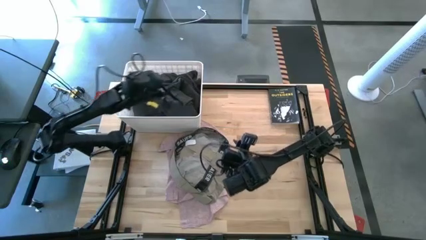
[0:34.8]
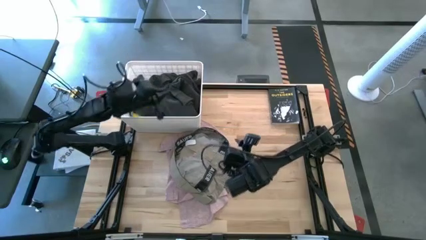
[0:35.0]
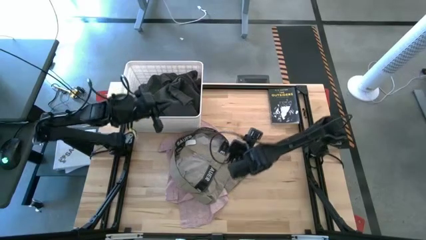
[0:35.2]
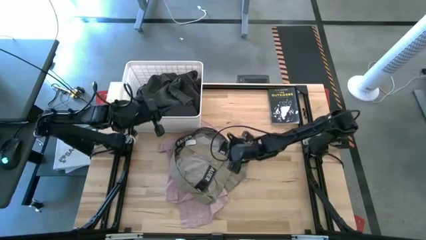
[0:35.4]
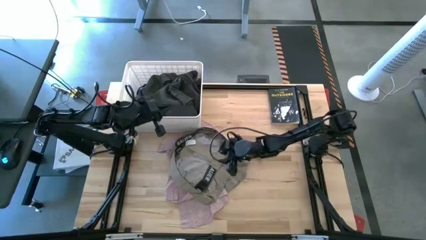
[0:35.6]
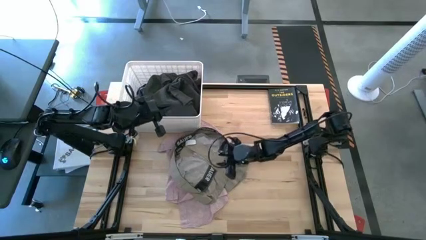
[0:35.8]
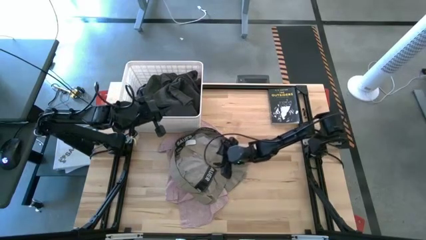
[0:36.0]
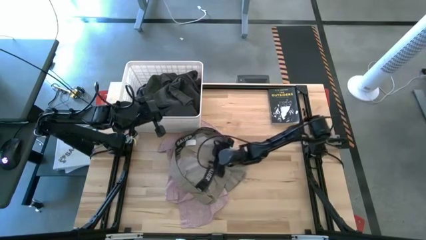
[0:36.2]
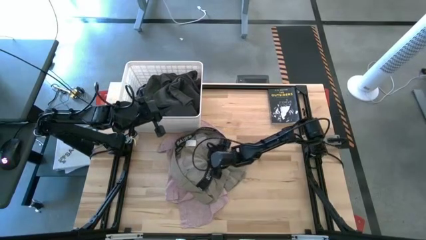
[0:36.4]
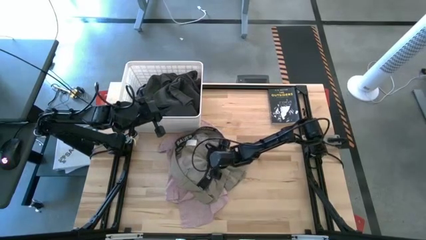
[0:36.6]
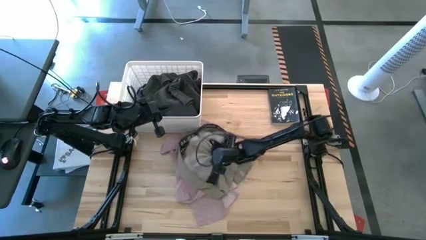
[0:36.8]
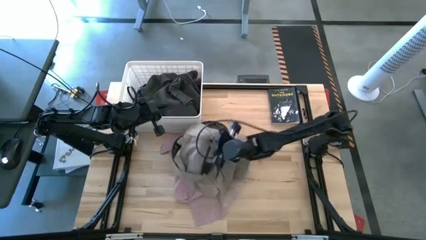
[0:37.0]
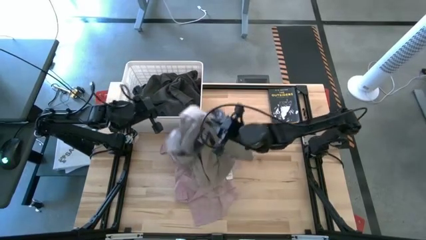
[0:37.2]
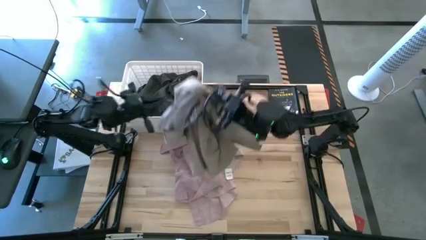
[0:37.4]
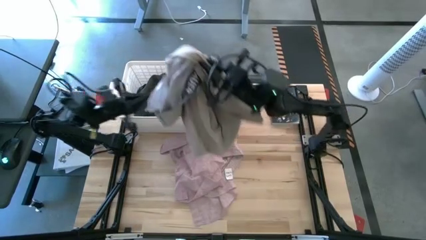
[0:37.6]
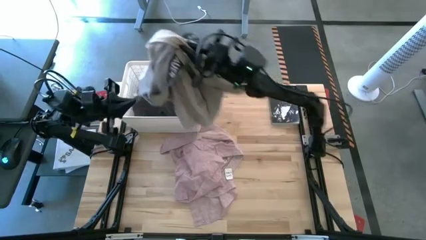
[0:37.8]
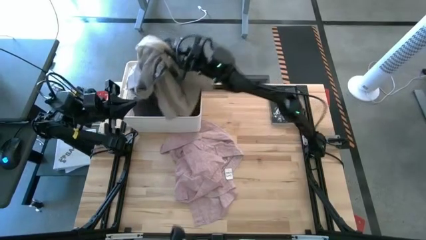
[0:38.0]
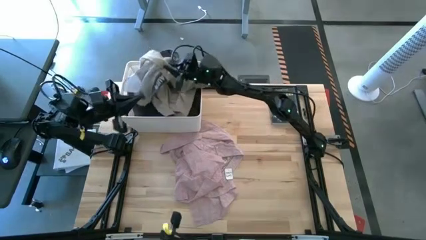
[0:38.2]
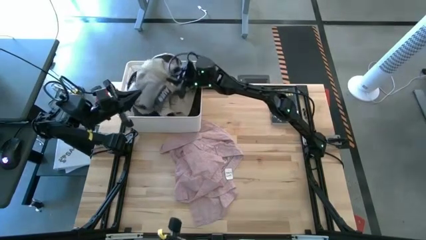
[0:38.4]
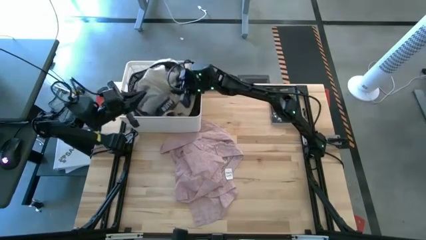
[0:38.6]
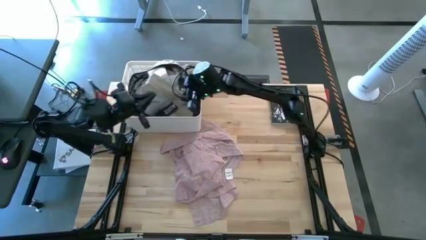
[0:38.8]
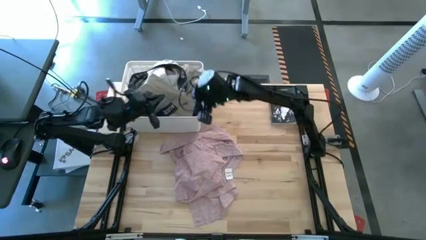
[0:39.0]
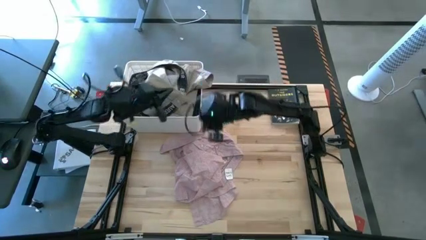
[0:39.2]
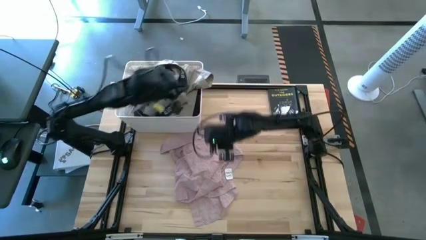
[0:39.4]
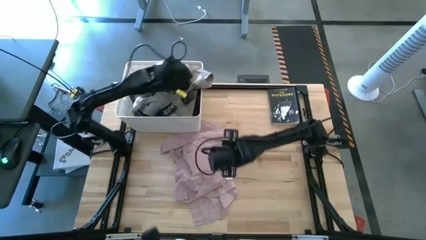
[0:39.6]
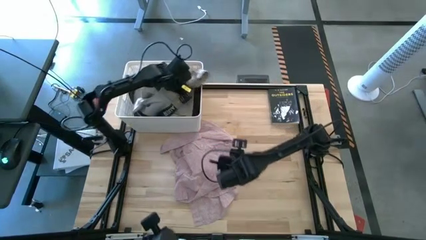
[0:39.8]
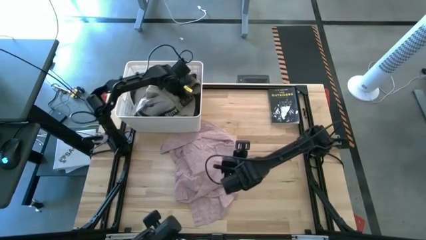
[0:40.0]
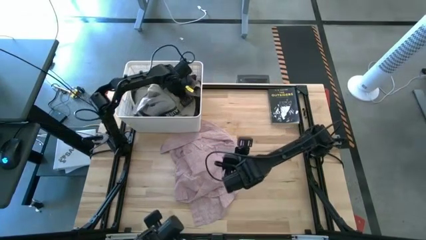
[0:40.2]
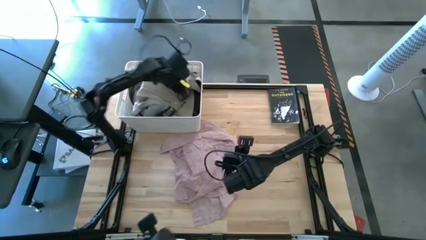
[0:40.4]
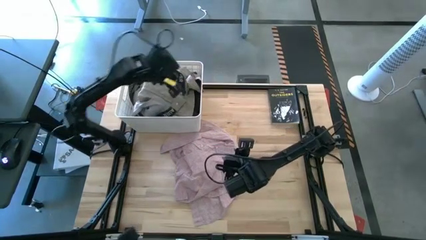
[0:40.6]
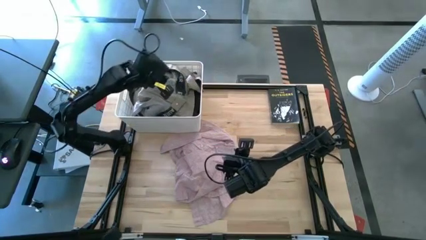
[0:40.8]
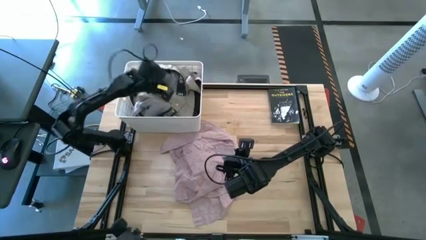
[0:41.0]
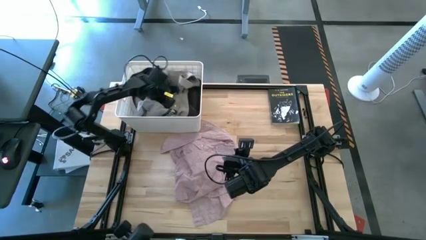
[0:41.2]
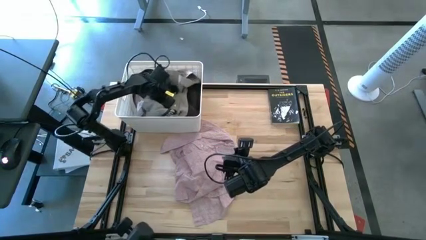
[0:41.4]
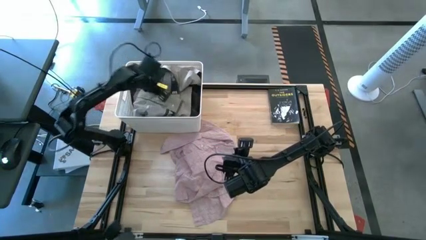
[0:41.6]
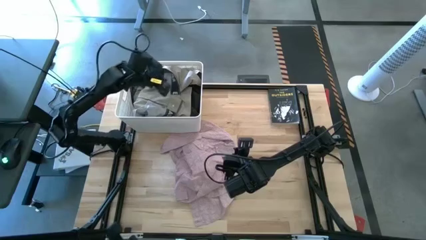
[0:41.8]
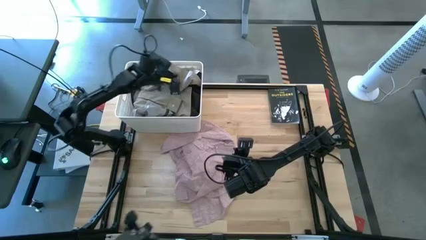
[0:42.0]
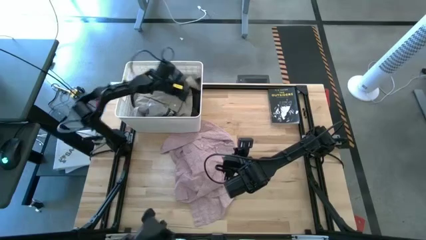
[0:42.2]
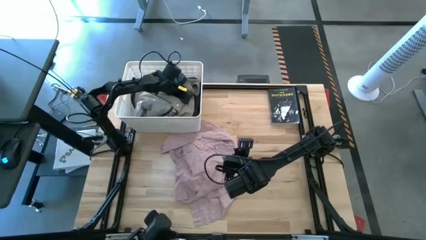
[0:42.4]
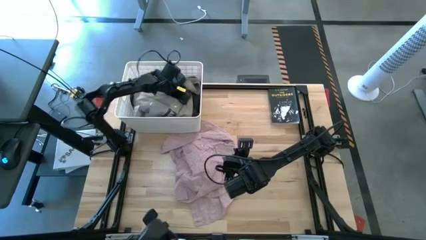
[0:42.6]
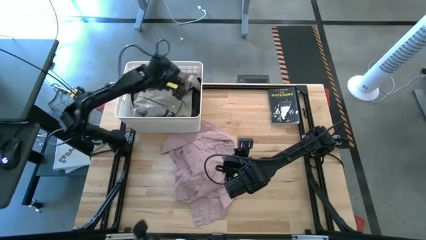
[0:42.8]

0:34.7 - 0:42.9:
Task: Sort clothes
Put the brown shorts into the white laundry bin

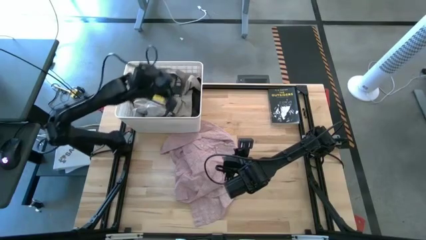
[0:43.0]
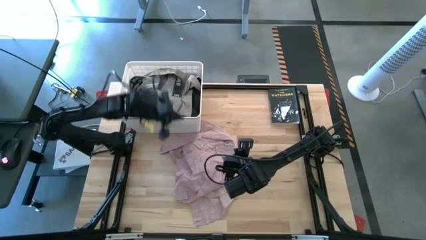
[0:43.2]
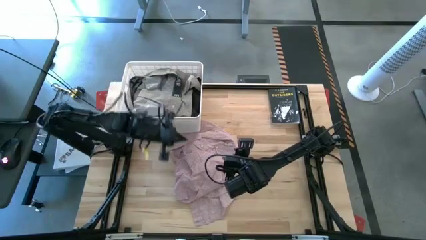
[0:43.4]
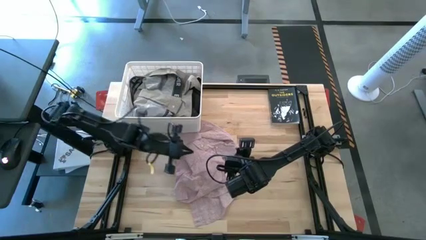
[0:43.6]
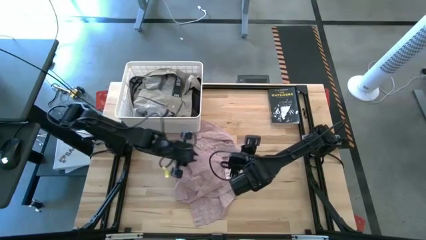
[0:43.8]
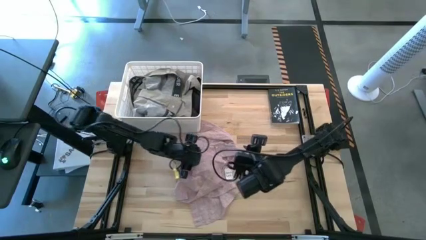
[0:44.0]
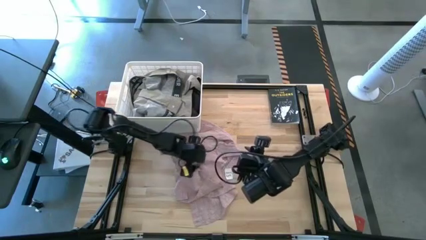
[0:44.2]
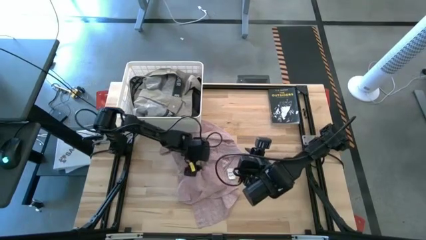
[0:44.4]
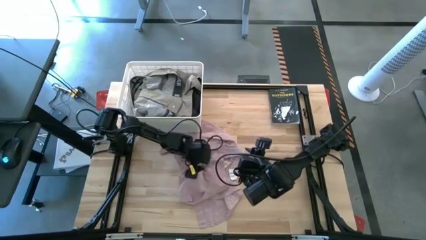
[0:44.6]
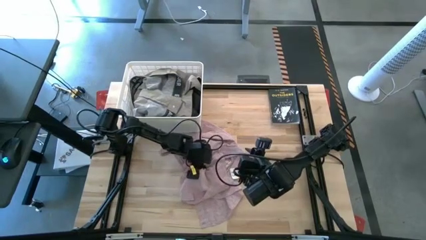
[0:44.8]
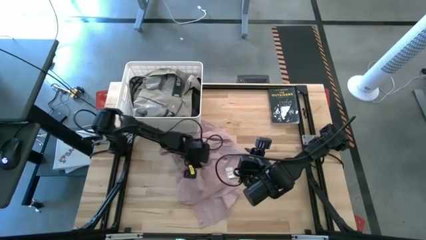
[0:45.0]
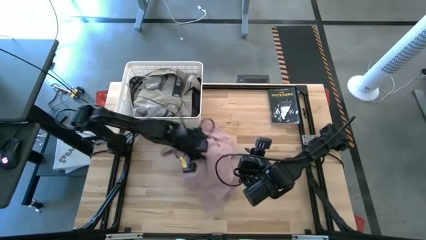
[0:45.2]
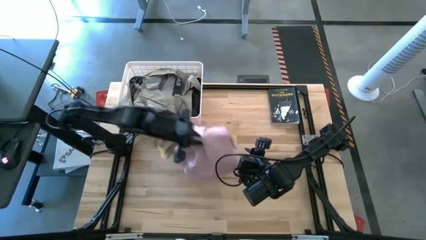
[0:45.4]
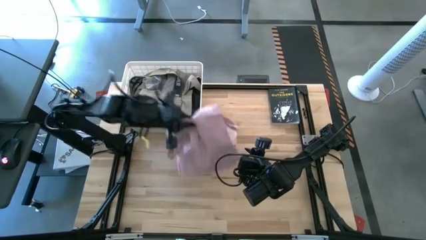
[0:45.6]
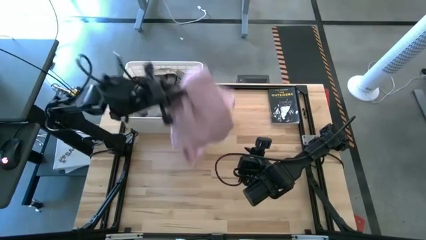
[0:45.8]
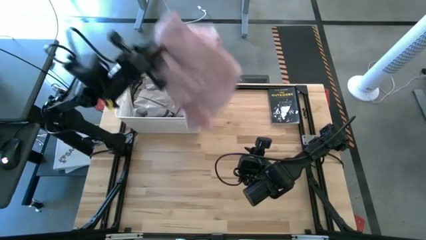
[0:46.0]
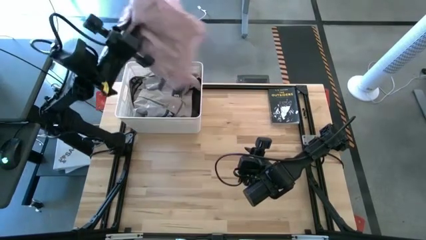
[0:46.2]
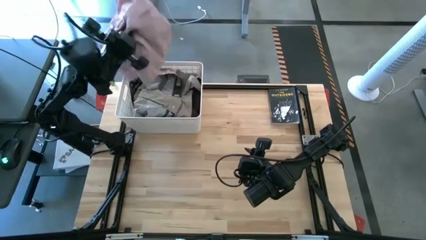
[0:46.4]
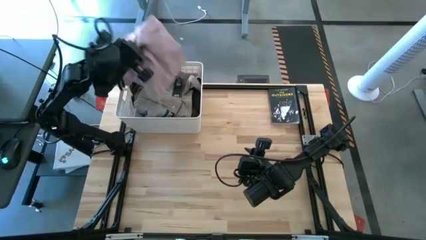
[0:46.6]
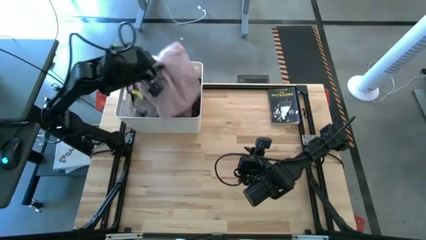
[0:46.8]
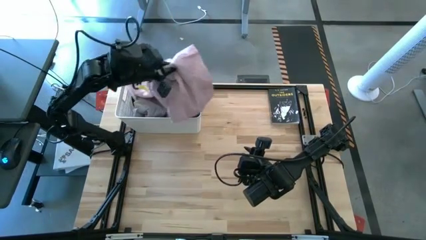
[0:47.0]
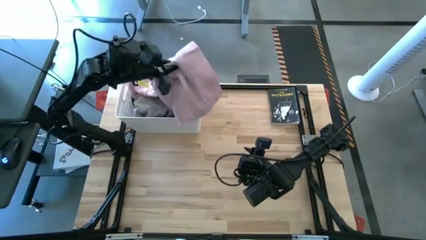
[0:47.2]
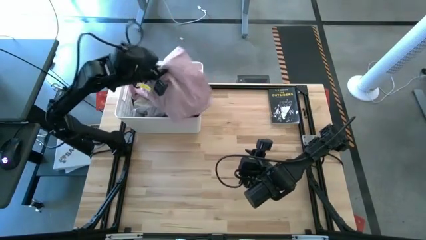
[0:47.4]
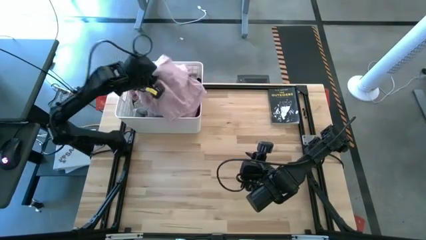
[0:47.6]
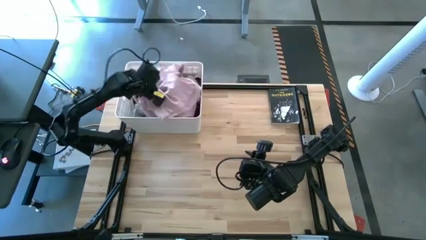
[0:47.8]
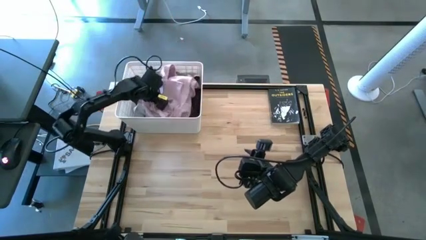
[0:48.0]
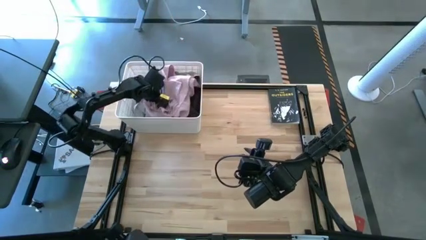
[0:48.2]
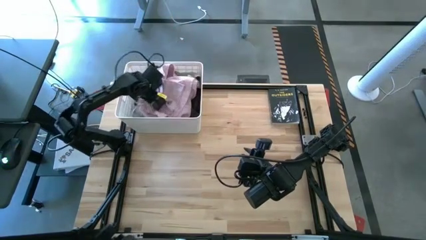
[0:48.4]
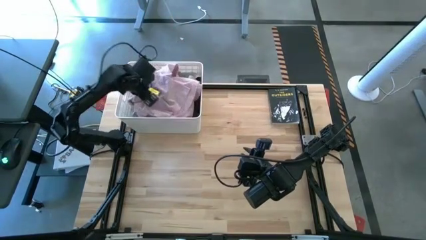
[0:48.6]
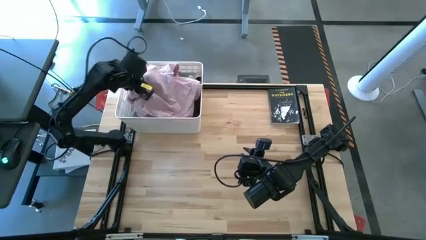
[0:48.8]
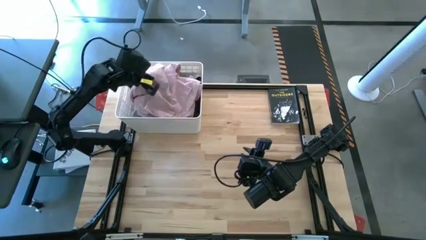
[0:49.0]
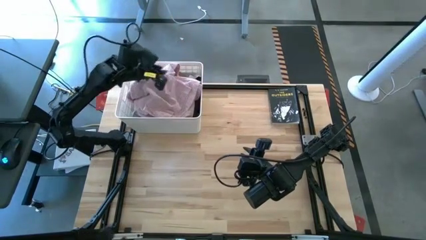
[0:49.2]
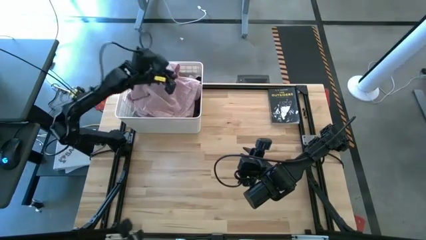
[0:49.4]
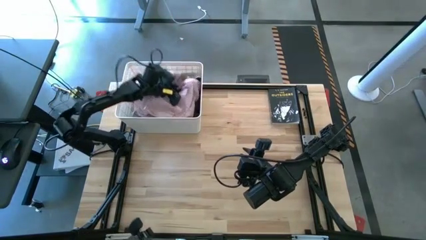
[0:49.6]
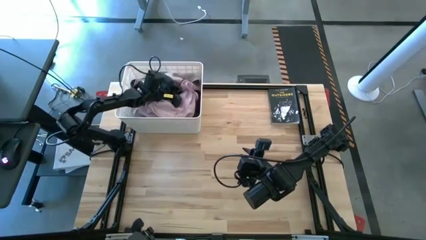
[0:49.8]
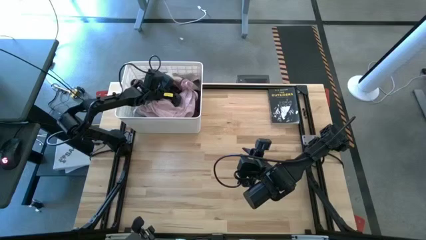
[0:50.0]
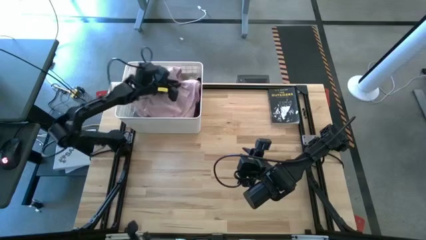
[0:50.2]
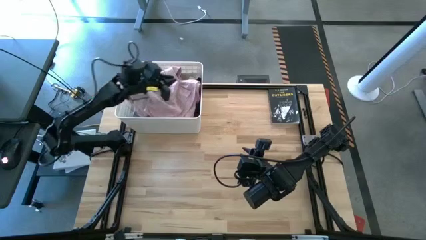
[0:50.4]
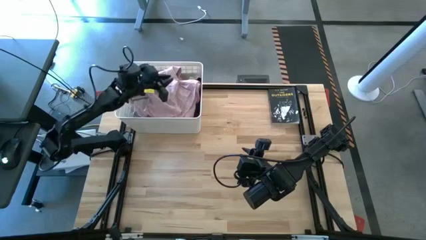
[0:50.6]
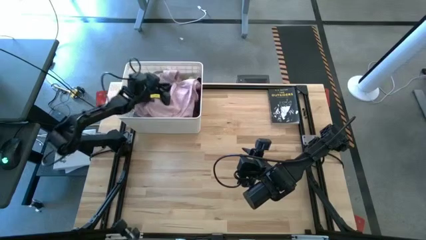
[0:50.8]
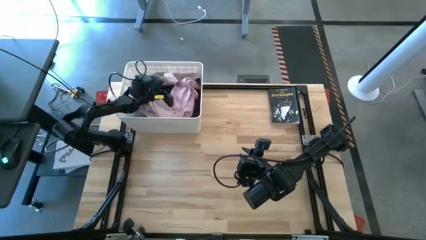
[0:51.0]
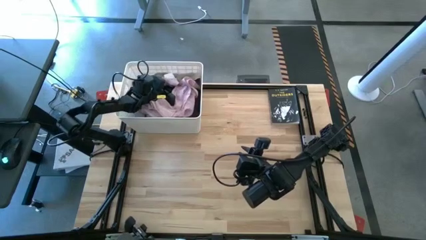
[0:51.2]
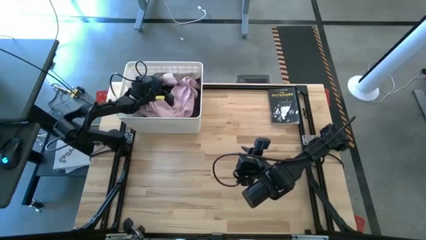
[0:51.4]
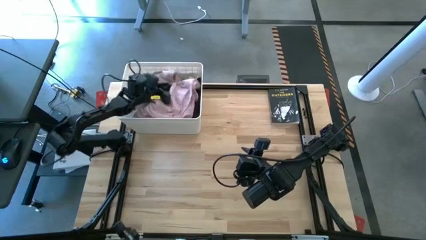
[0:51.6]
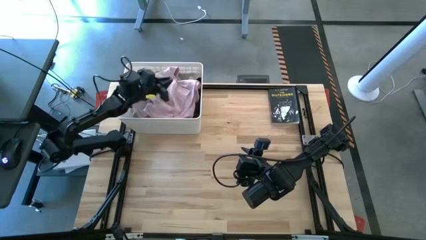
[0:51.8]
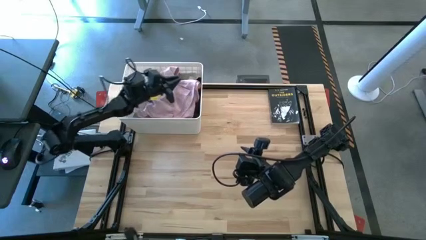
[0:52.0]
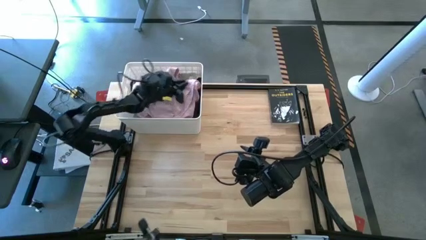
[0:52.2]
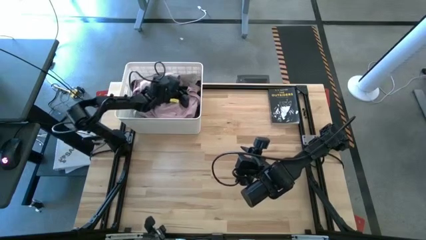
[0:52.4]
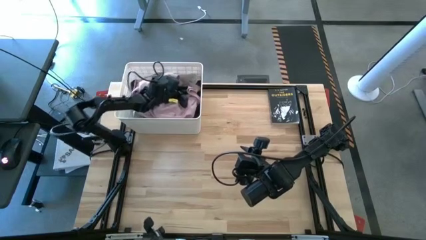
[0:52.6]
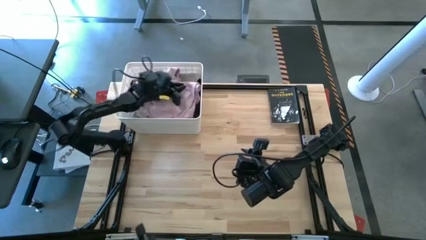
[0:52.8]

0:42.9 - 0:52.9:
Put the pink polo shirt into the white laundry bin
